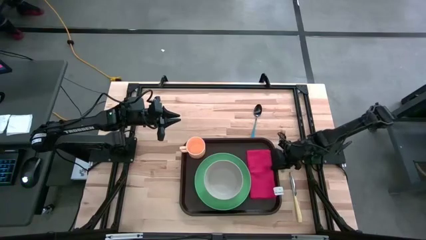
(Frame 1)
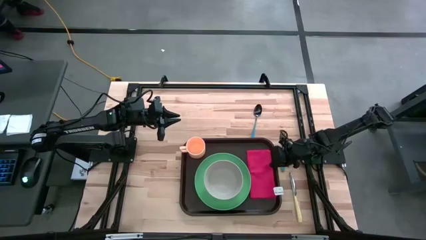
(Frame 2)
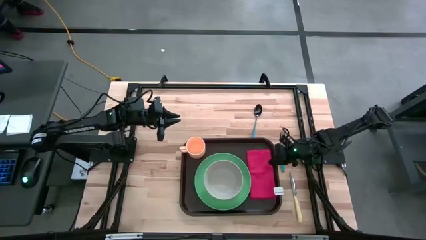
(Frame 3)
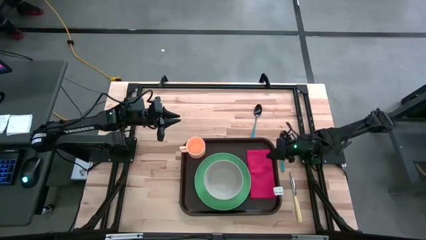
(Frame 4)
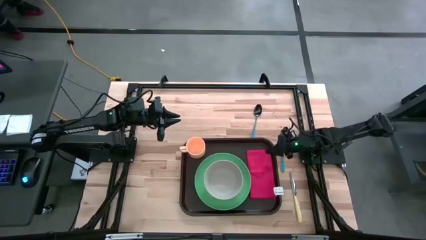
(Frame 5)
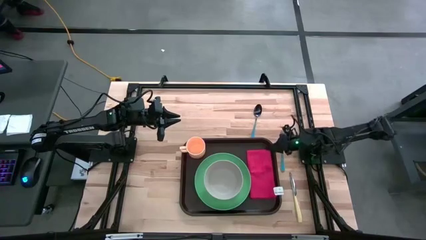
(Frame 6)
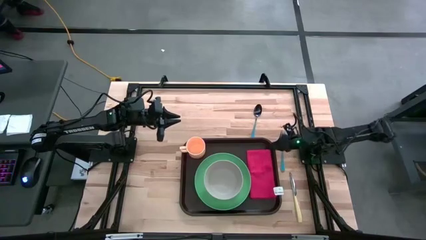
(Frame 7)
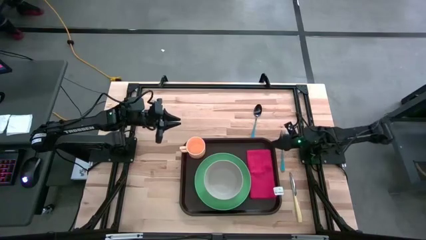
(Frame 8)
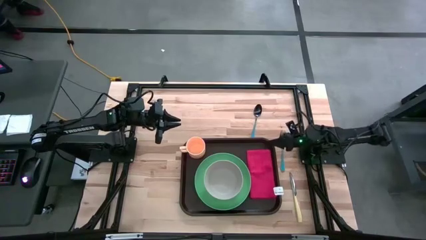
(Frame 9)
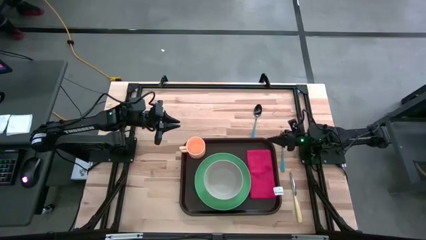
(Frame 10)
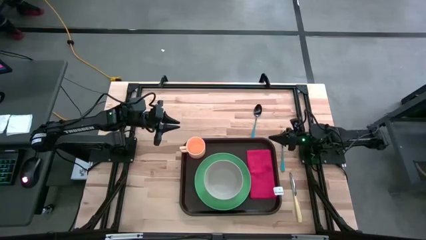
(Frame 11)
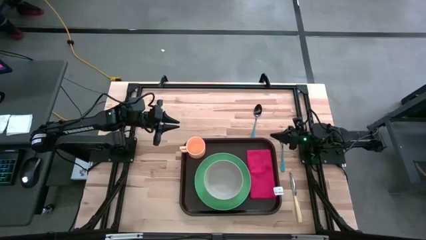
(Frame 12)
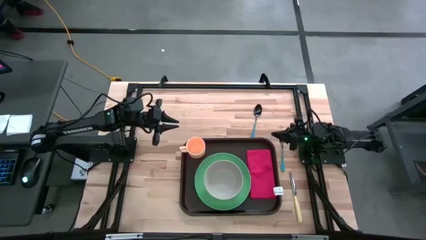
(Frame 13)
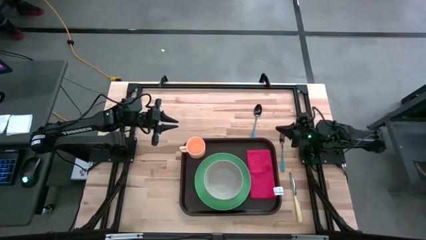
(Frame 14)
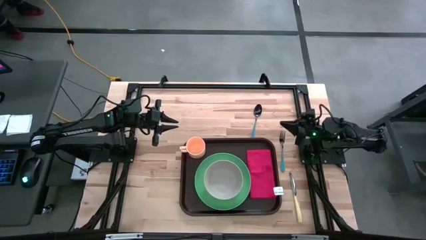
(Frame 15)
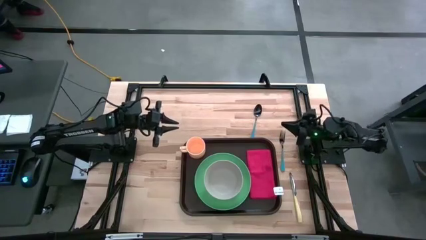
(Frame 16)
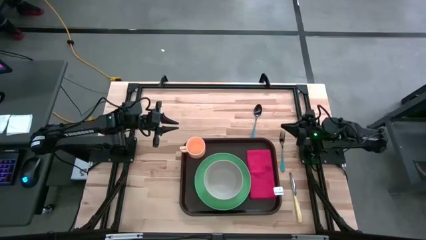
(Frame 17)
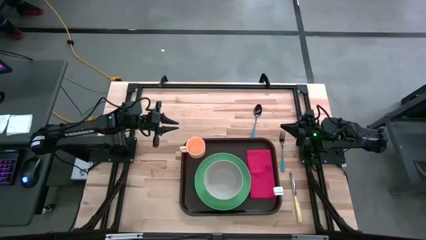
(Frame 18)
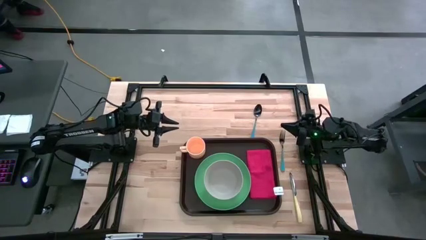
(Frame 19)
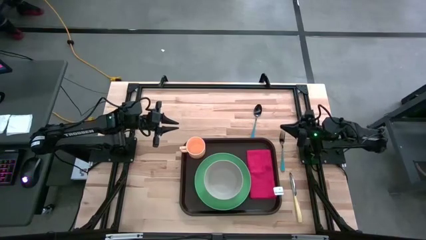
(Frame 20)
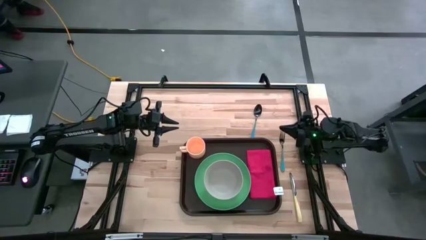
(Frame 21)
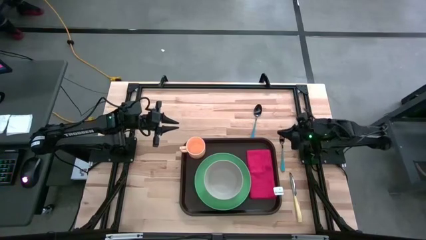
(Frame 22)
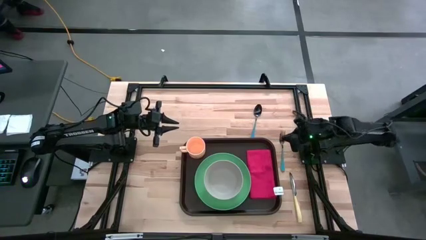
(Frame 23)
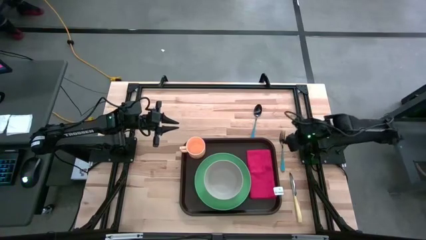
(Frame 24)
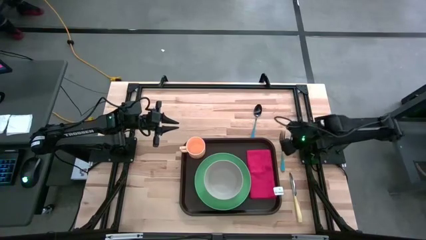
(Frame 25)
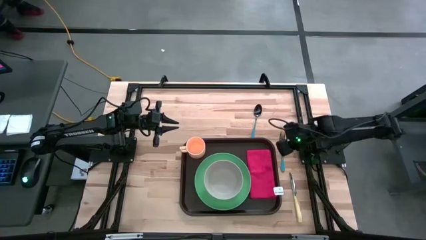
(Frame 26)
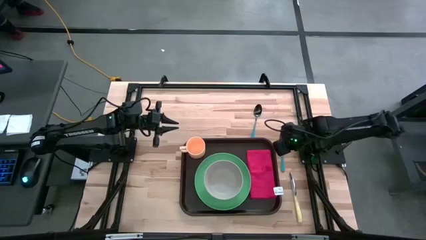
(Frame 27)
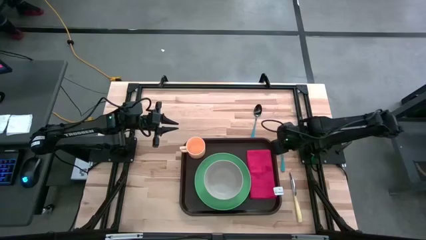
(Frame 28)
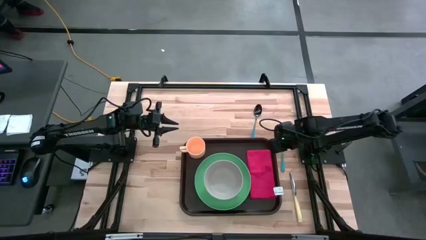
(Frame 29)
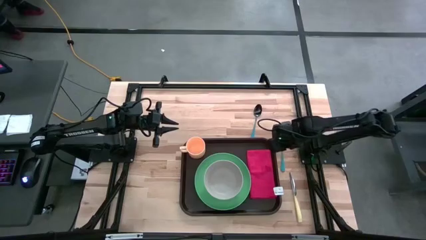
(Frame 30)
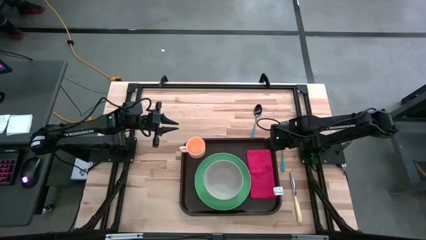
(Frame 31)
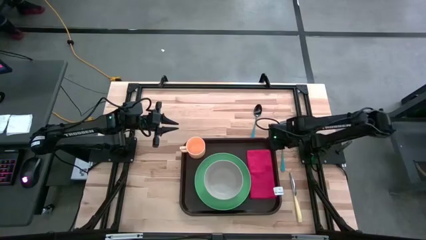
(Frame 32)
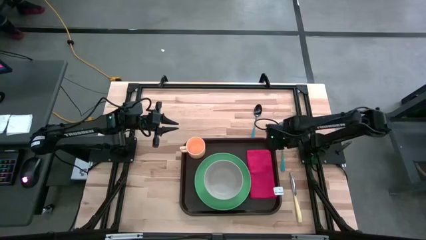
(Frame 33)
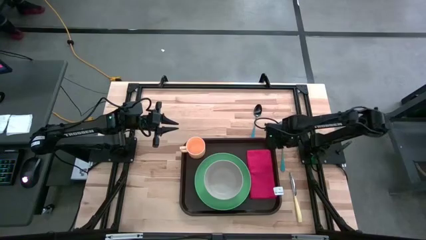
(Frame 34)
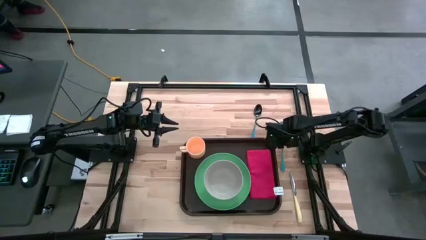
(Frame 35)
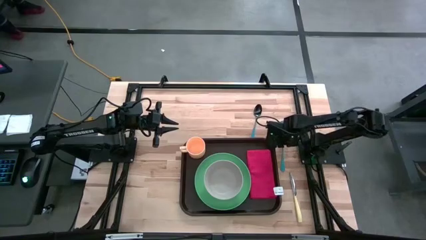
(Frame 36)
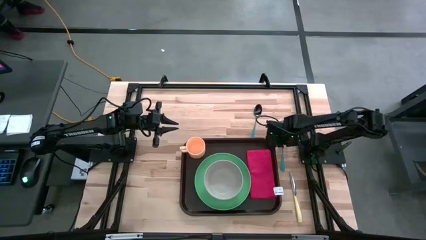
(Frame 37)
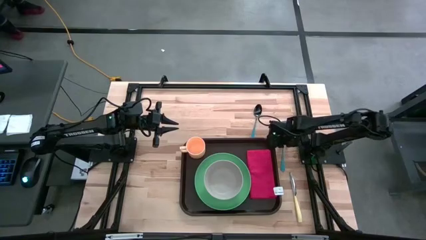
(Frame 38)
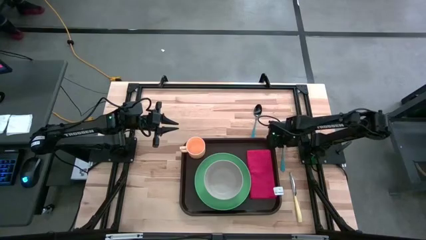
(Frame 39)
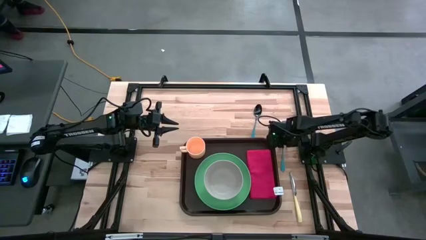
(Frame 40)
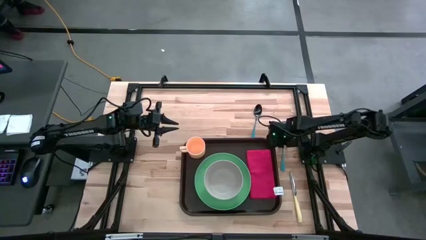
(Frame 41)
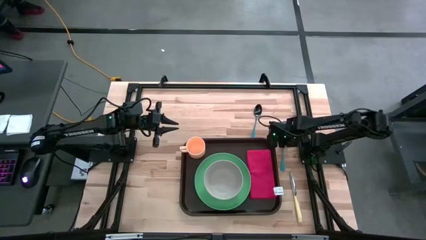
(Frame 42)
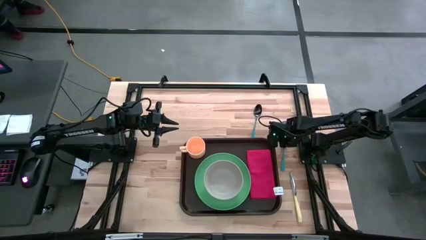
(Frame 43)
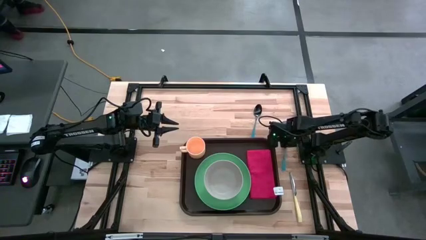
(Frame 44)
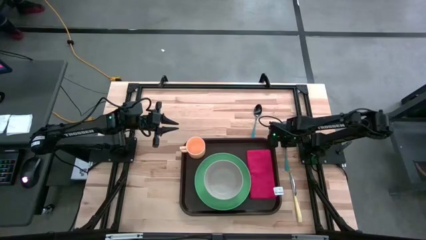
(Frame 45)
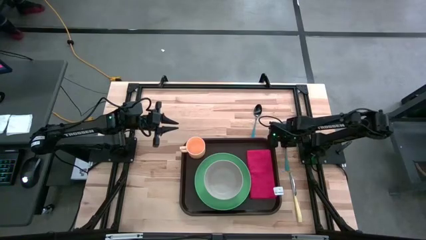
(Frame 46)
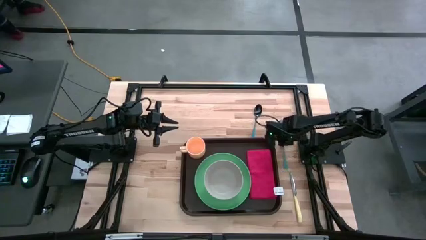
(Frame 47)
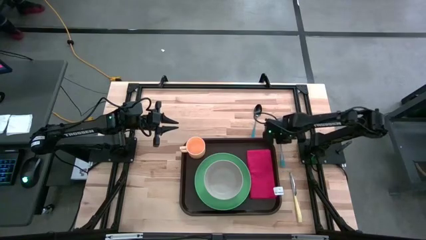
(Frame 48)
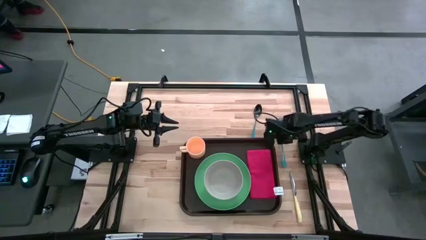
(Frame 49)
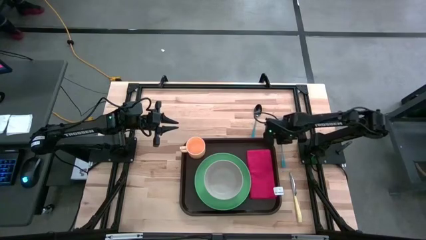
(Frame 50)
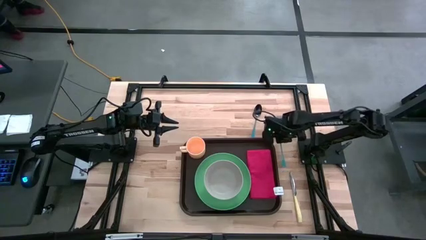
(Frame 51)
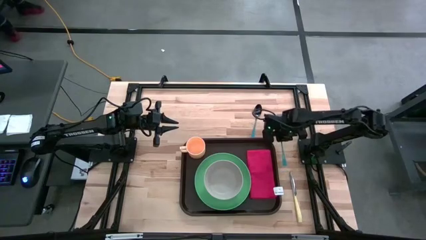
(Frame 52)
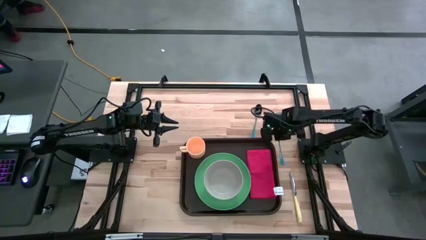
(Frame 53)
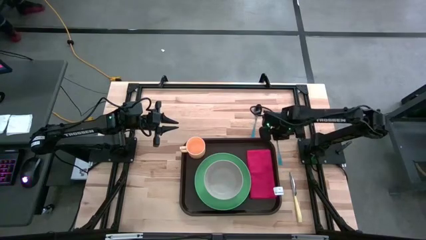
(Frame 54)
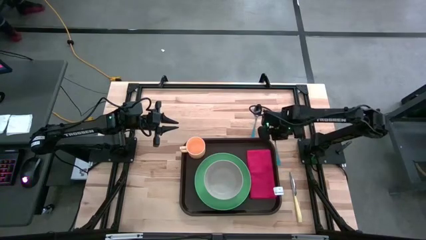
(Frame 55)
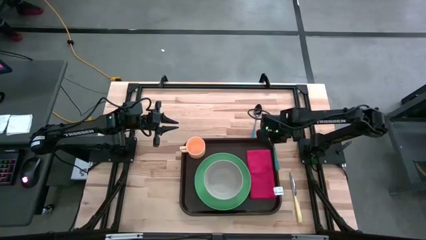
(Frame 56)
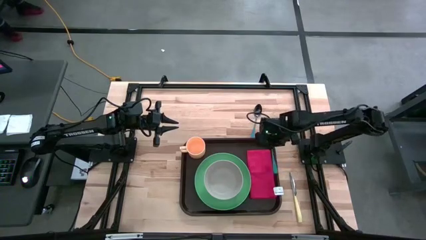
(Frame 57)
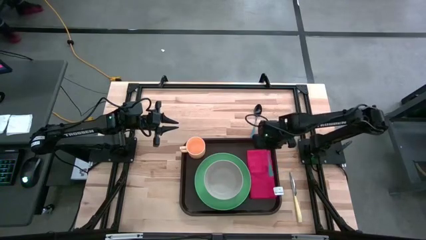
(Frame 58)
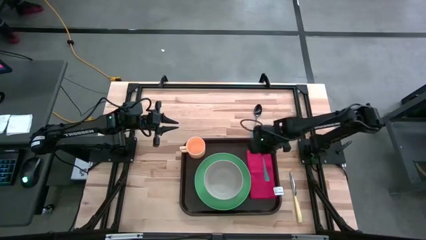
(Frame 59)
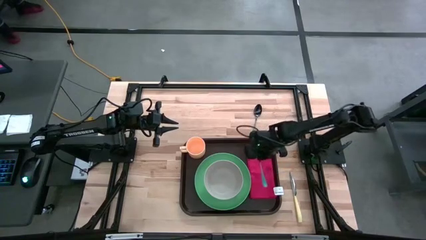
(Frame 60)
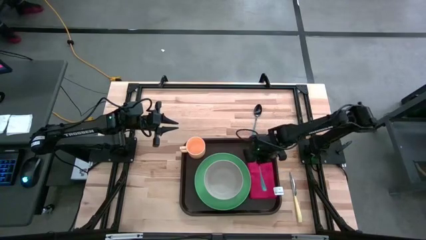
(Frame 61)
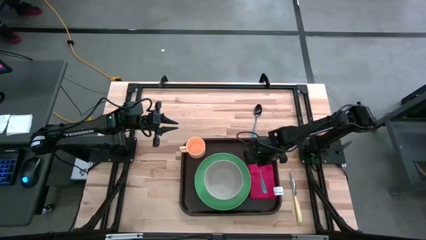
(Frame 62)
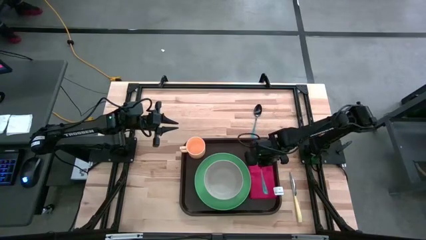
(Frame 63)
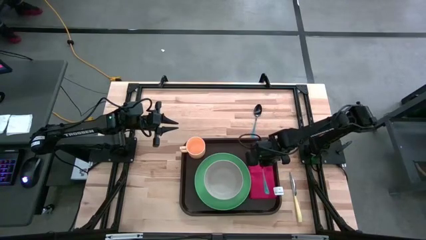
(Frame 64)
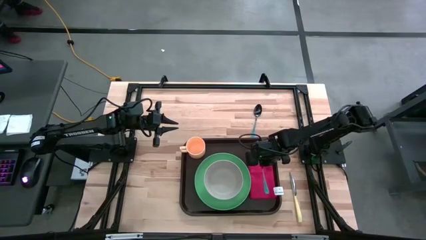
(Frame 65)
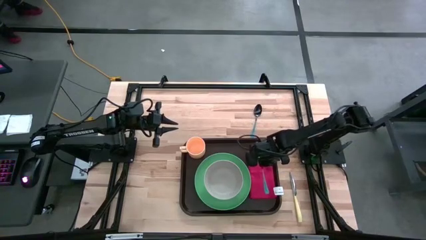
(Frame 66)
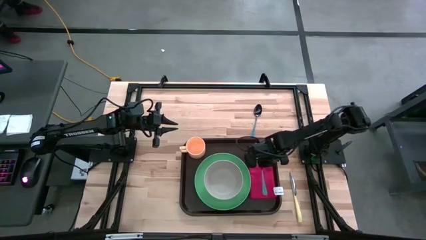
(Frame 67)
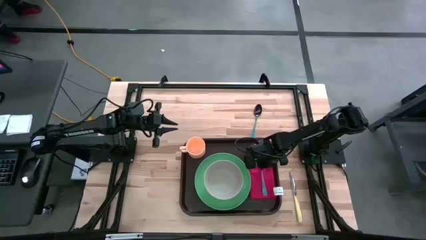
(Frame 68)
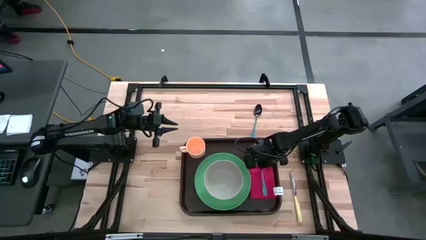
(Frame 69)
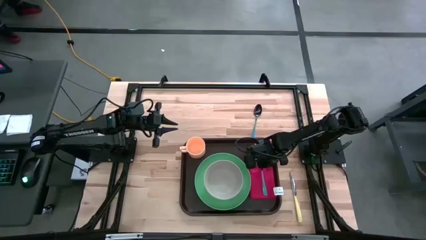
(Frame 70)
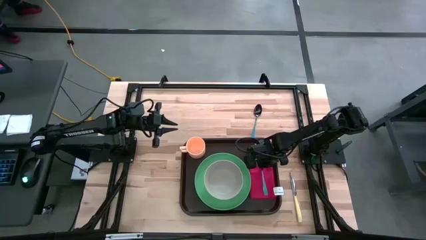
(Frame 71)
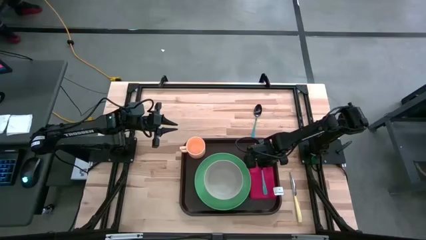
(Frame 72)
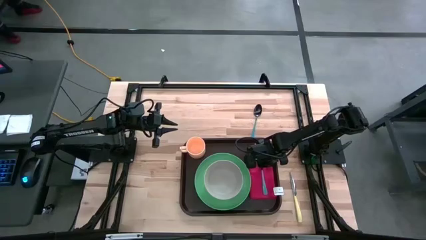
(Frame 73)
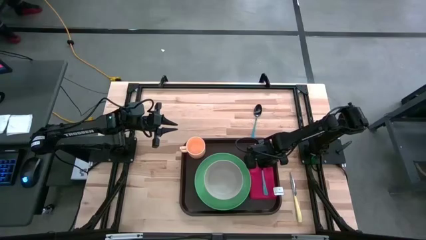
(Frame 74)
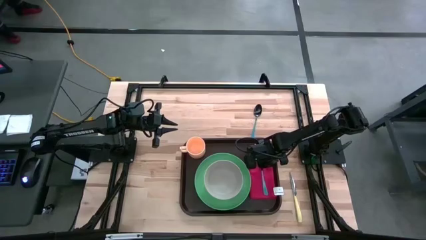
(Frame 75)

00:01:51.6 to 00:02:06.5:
Task: Set up tray
Put the blue fork on the top of the red table napkin on the brown serving tray
